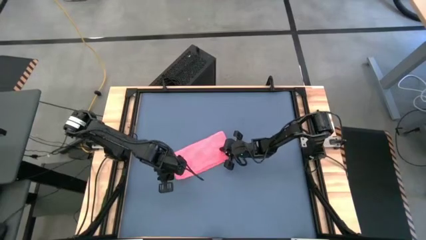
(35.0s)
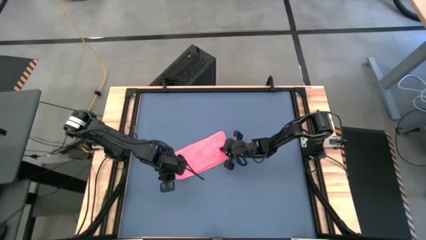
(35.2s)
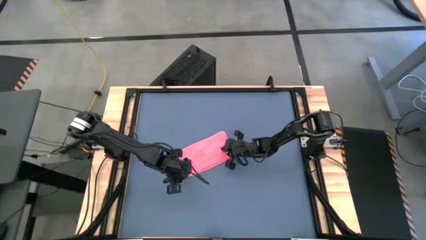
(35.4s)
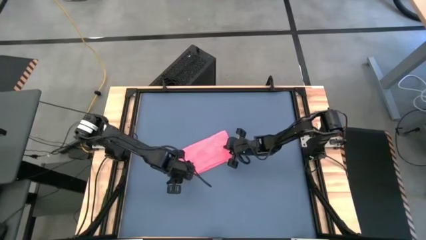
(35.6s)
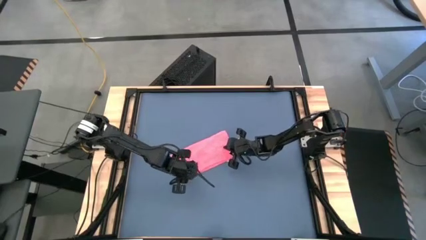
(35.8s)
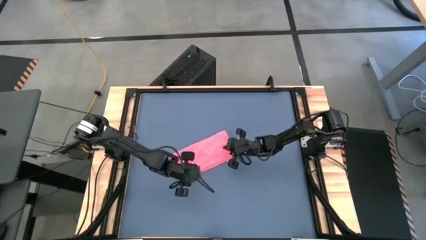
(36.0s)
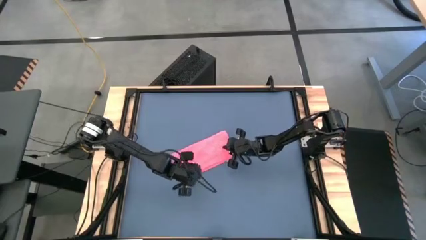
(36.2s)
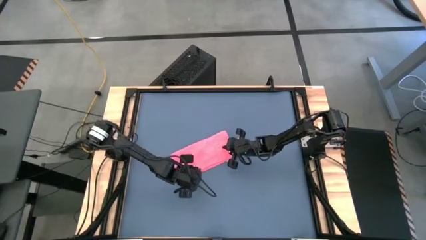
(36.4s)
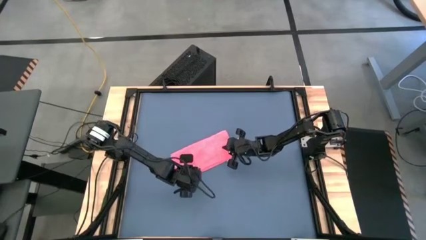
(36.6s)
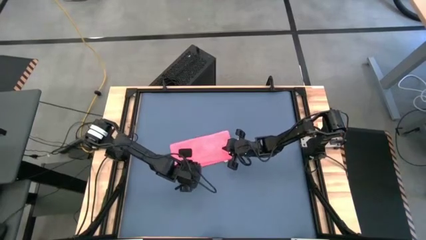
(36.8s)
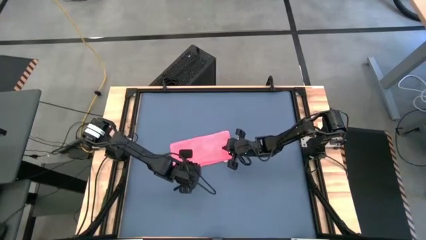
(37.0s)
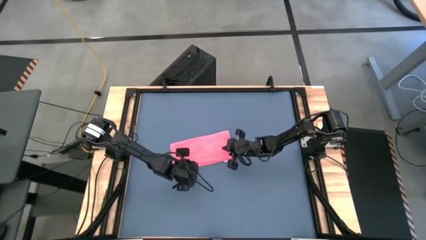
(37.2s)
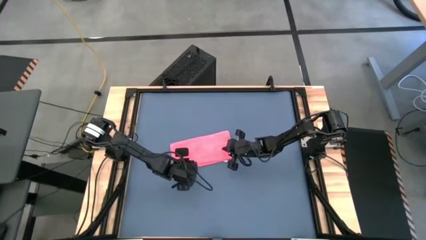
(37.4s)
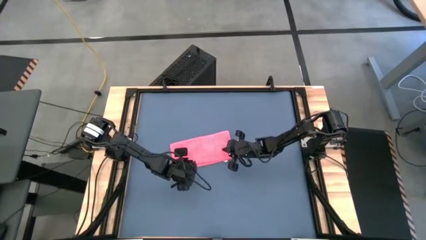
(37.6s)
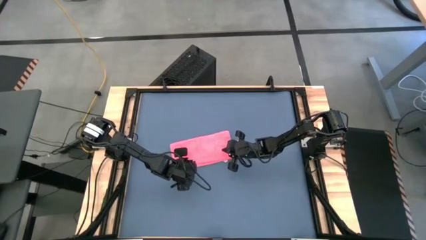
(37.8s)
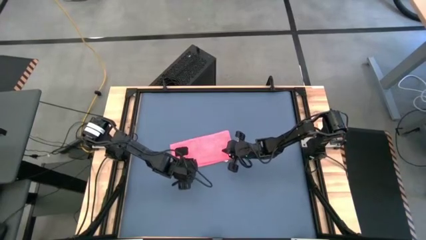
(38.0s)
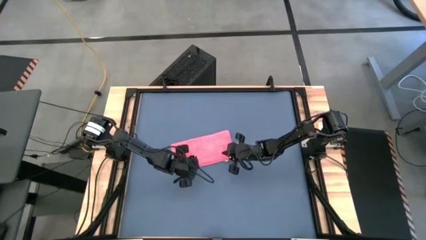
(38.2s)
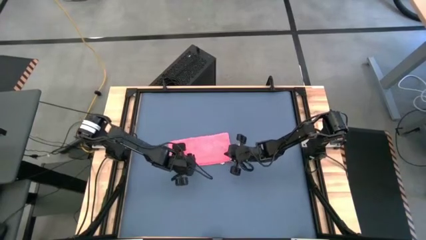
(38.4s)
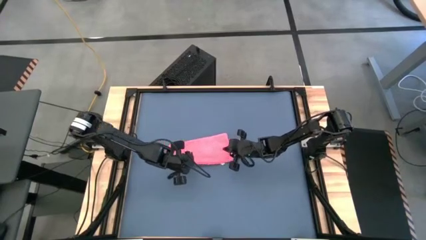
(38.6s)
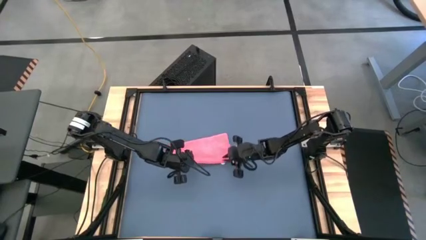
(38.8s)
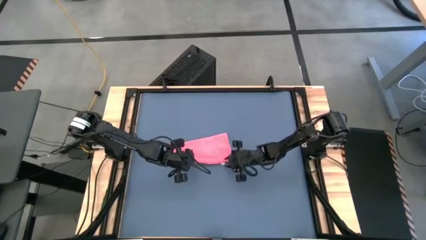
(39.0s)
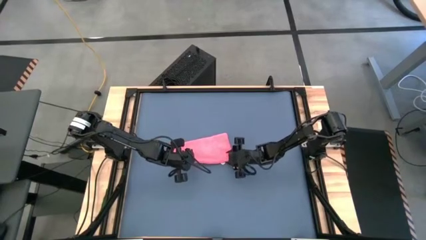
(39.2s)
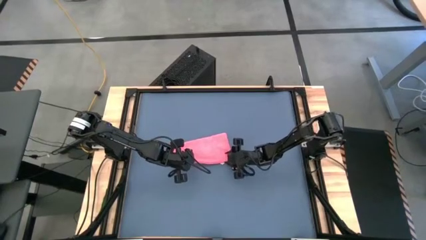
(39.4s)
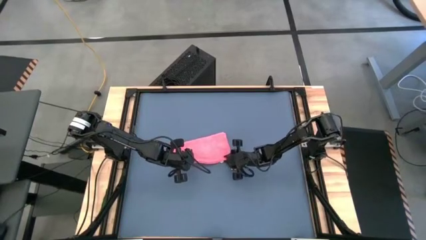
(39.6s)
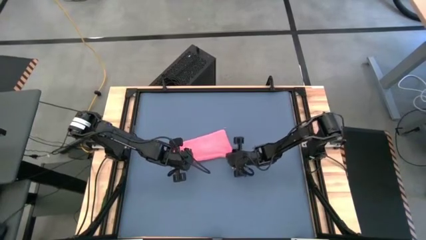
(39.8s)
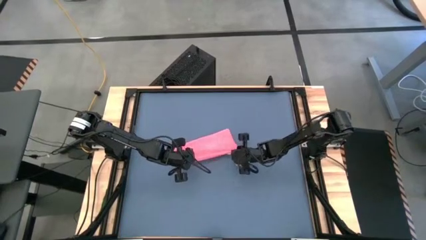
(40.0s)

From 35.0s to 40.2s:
Task: Roll towel
Fold the microfiber towel

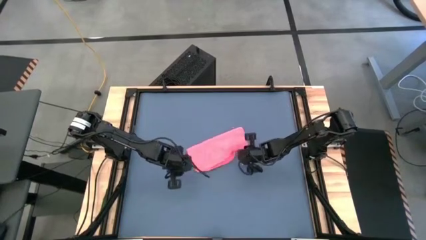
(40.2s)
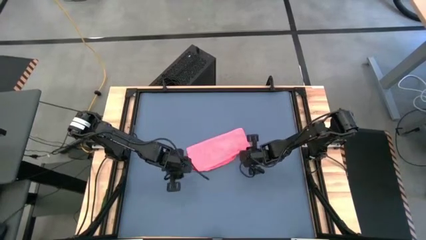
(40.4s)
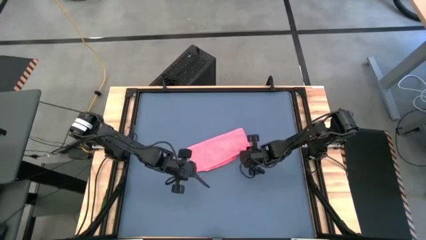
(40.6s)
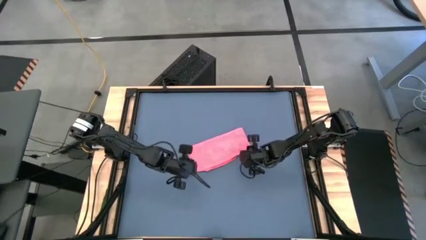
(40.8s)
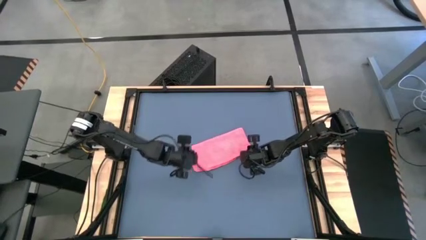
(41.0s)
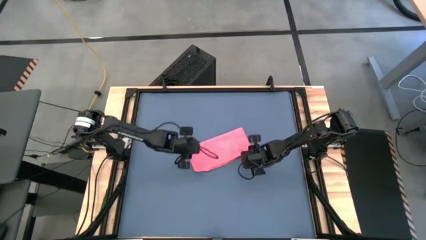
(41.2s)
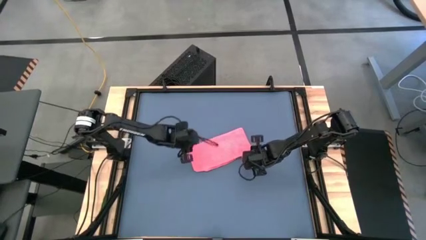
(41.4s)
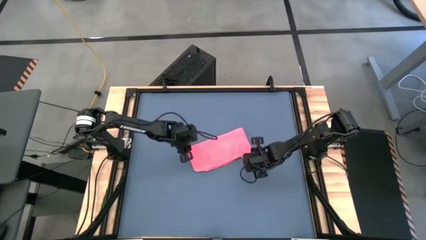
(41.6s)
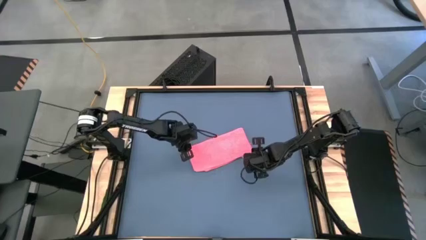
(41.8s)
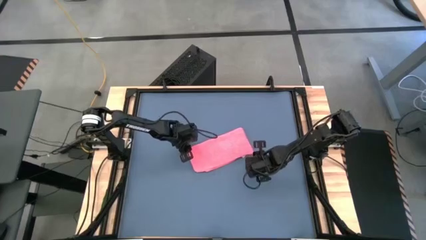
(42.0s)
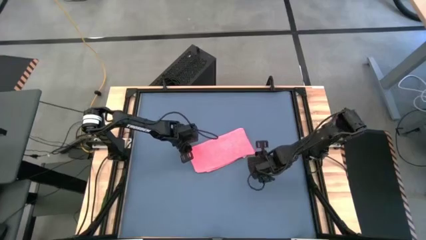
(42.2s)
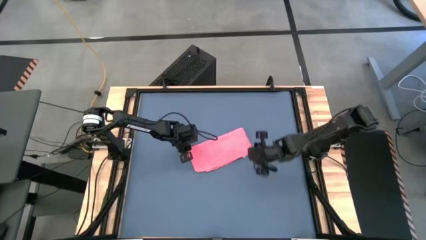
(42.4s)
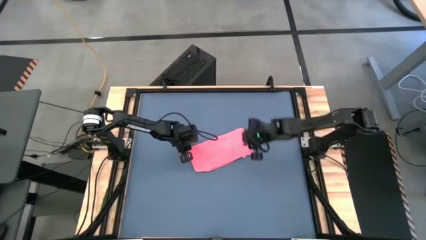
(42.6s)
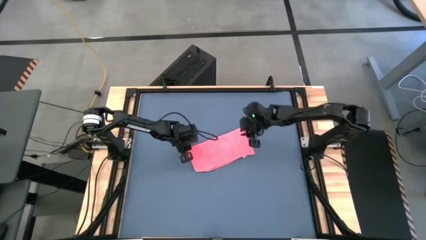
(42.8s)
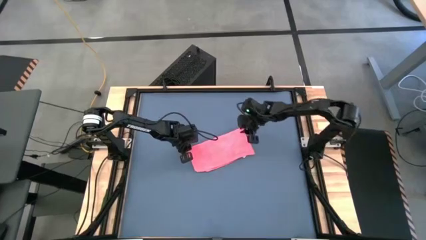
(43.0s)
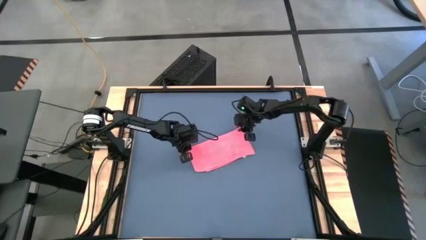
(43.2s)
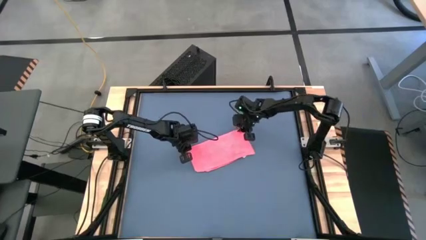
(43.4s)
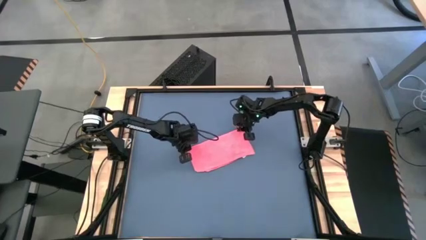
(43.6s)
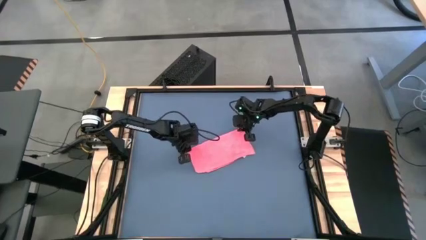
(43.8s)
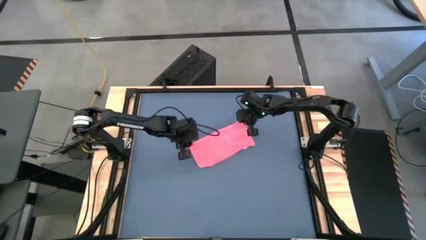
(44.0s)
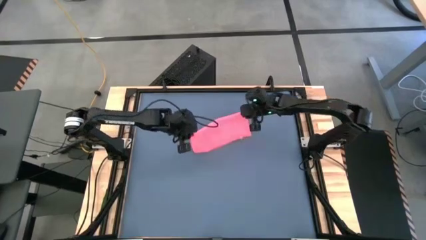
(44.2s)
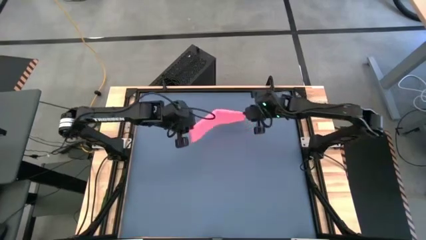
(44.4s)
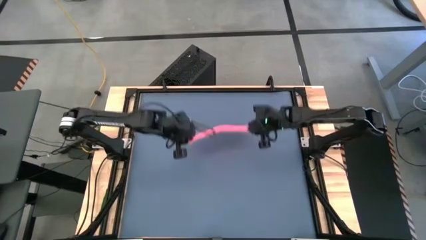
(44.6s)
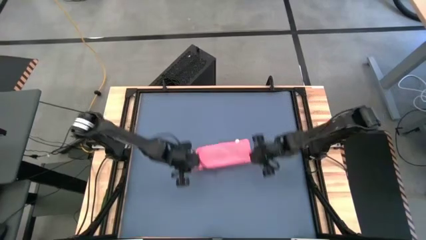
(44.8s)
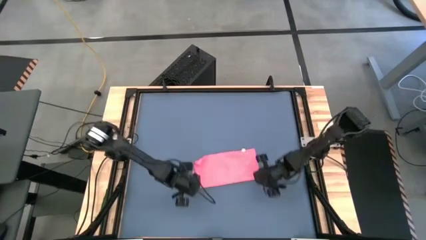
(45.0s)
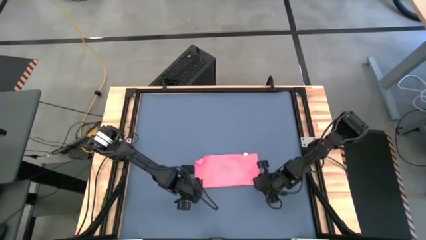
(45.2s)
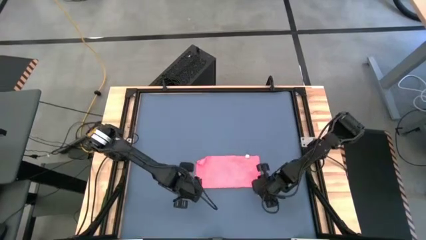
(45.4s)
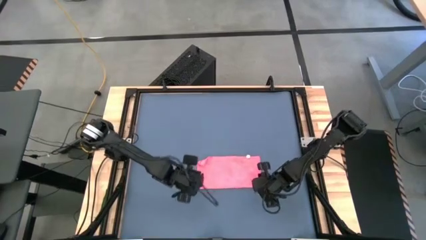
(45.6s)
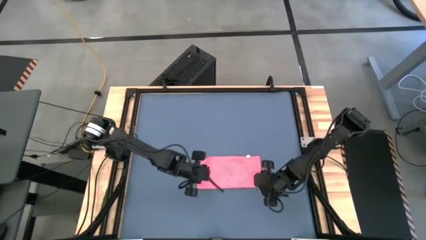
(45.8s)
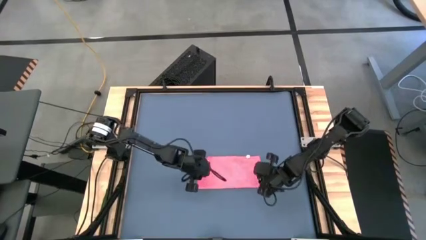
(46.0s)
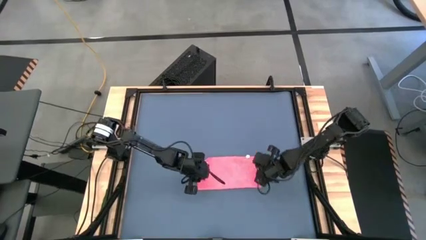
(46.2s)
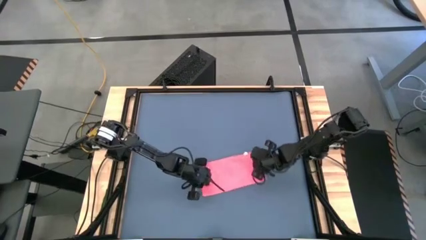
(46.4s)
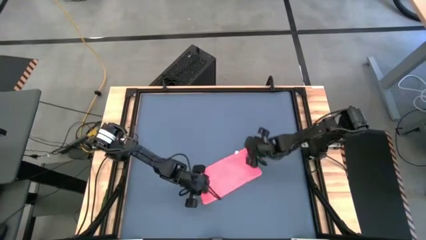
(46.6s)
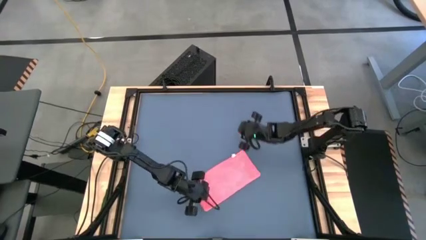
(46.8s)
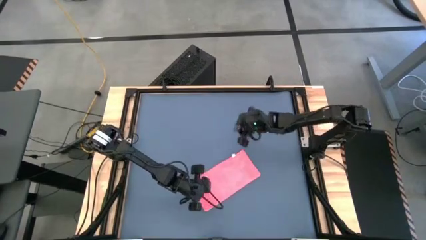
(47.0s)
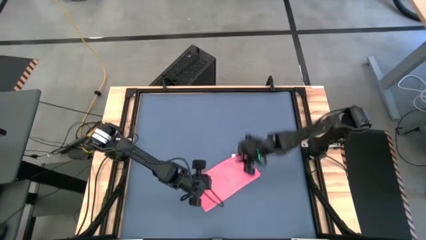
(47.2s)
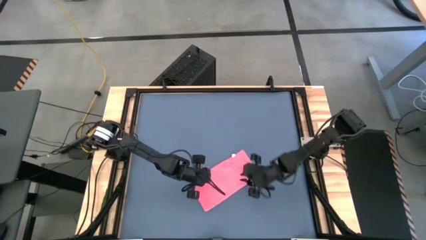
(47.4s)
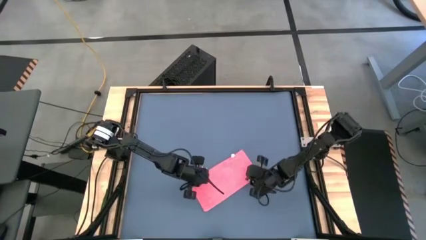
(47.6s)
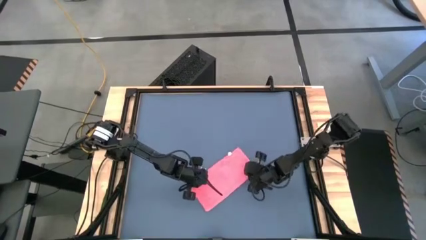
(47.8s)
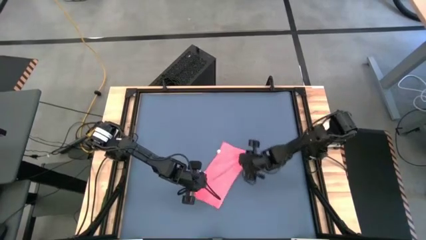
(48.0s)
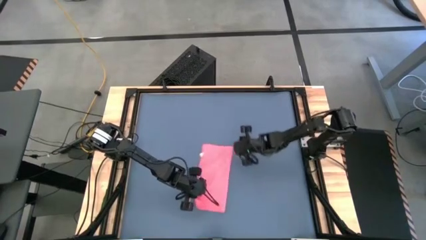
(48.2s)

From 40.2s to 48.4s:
Fold the microfiber towel

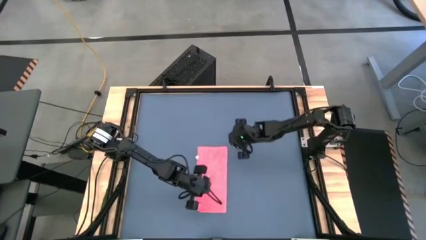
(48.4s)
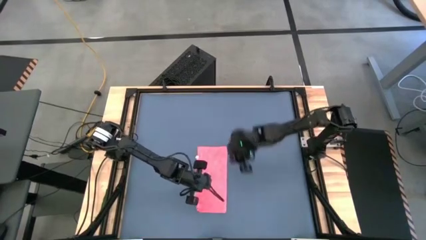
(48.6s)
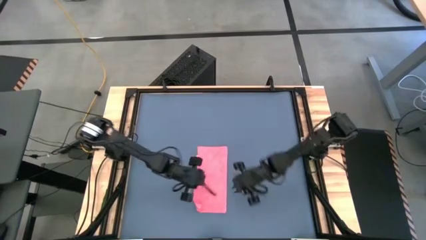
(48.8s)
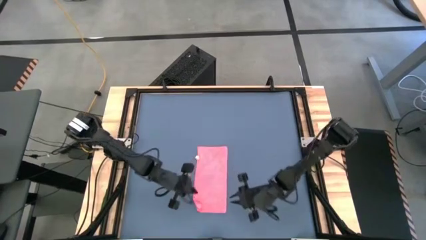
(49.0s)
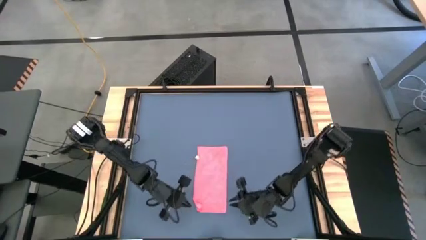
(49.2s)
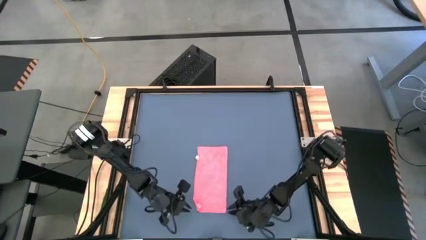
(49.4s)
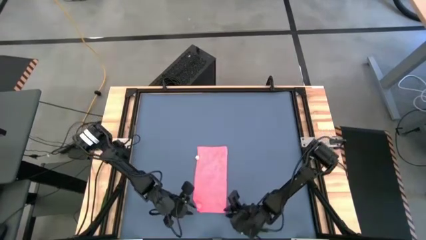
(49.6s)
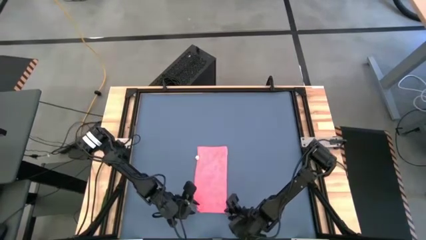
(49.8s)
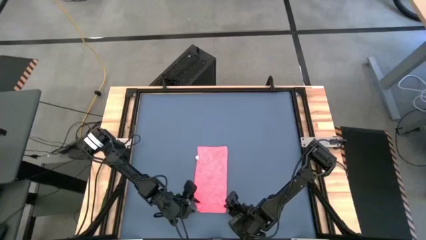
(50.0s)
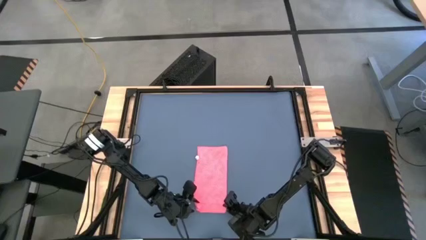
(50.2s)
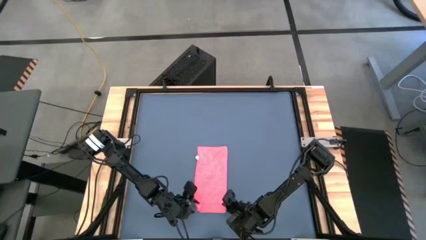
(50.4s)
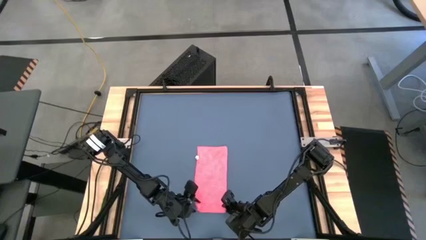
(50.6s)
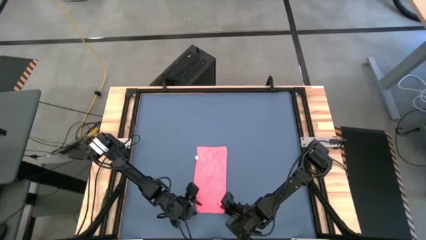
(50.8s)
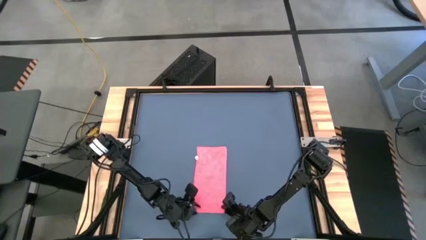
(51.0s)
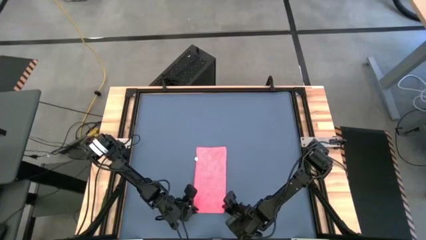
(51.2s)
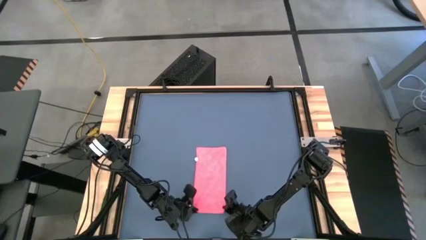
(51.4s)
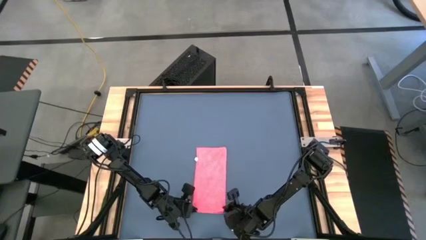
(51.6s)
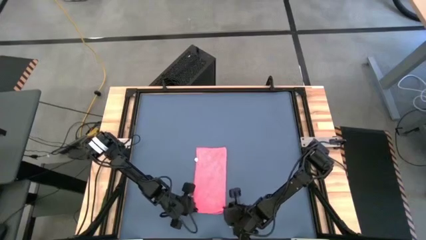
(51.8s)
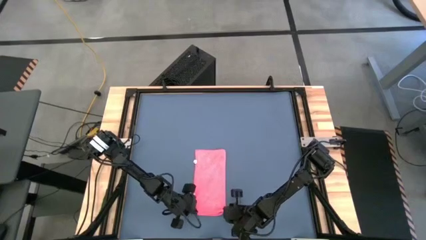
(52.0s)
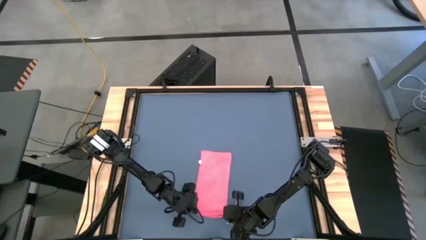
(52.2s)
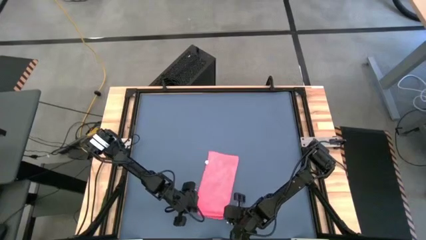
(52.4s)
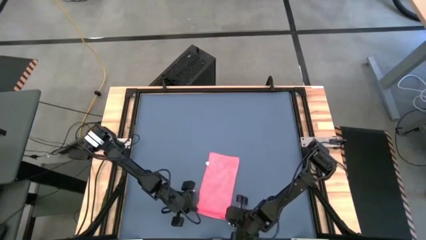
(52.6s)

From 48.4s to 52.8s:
Roll the microfiber towel
